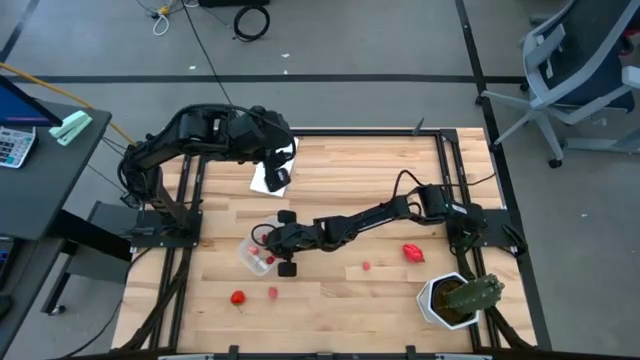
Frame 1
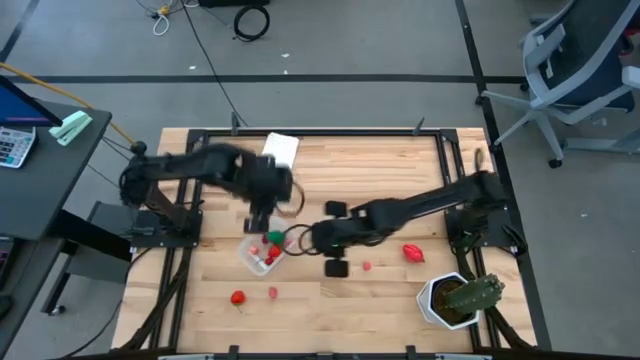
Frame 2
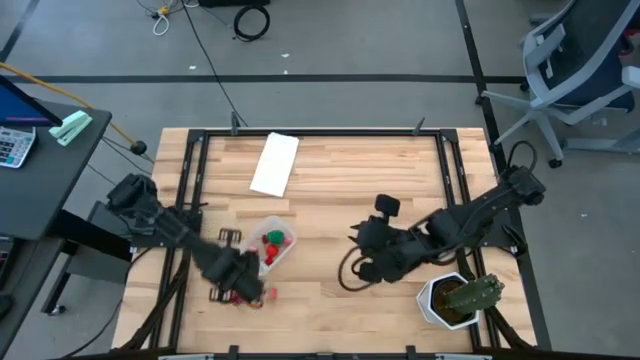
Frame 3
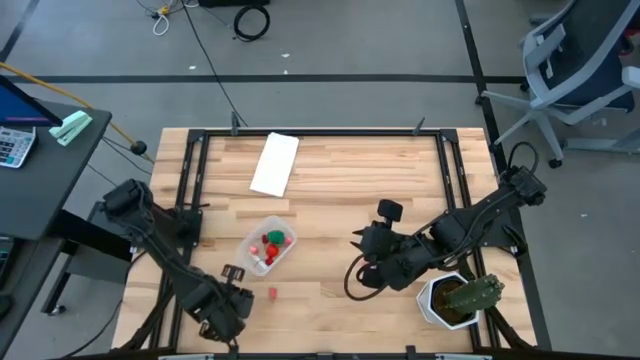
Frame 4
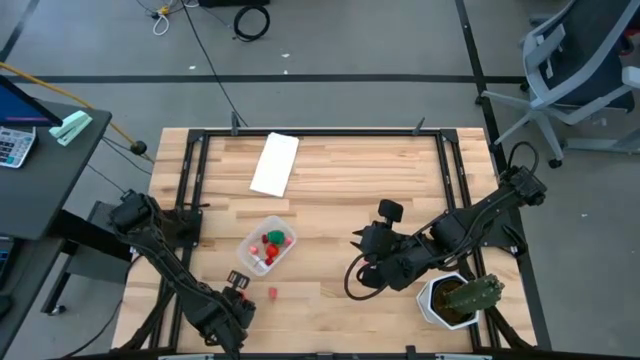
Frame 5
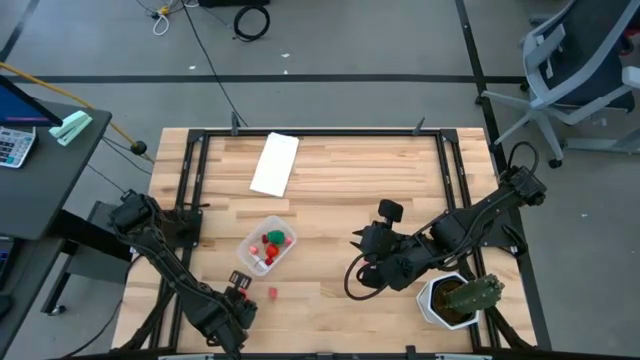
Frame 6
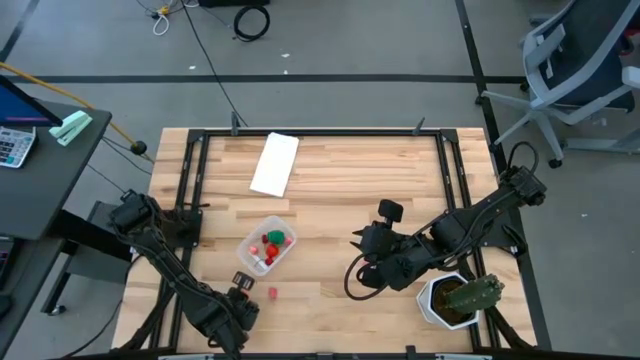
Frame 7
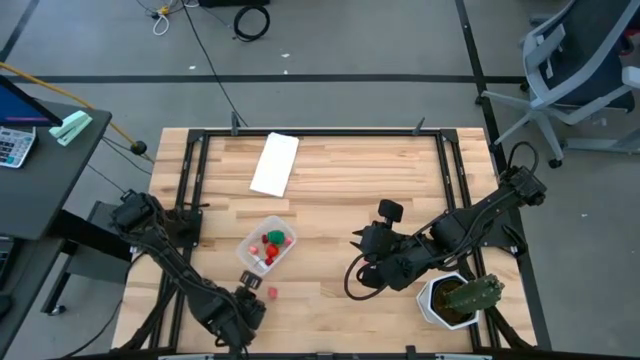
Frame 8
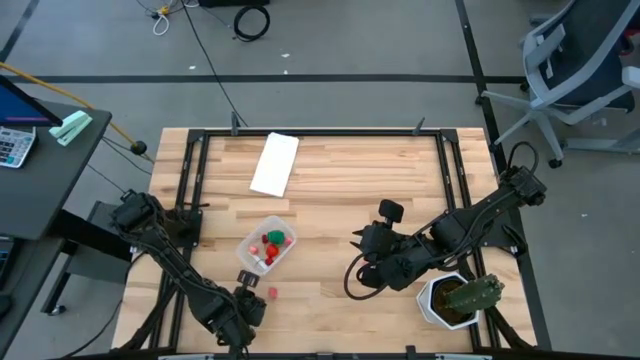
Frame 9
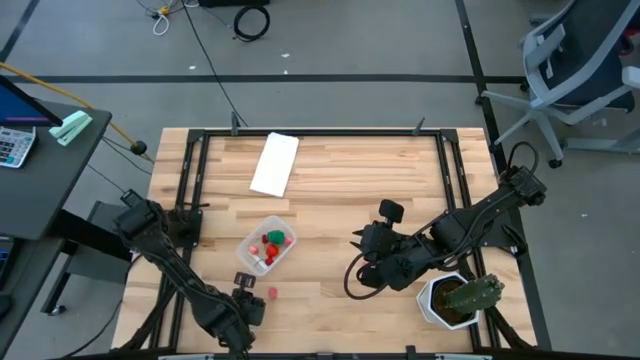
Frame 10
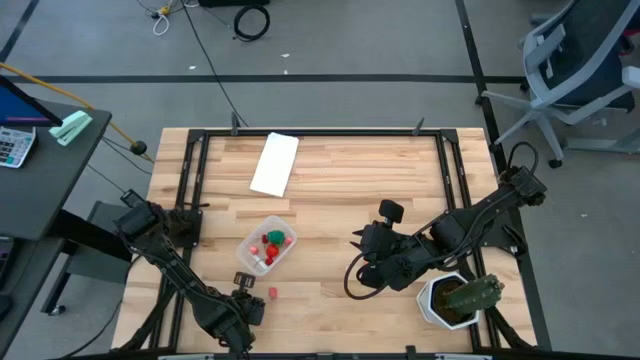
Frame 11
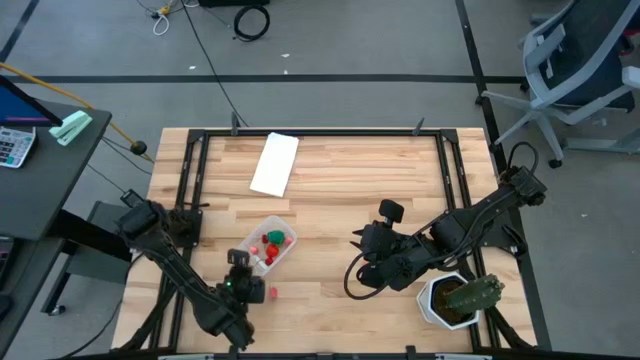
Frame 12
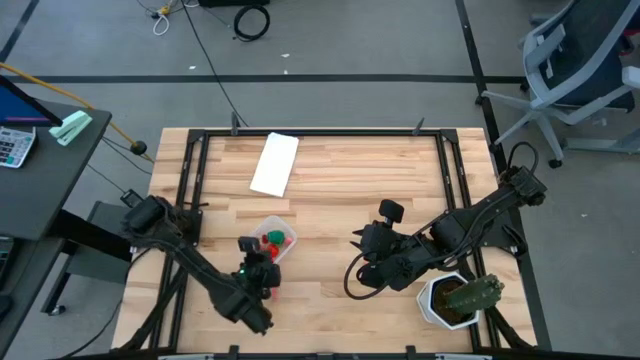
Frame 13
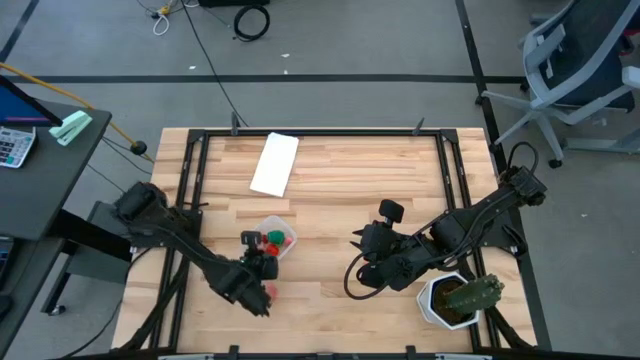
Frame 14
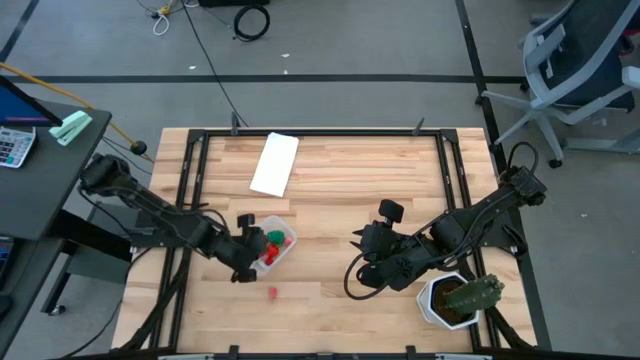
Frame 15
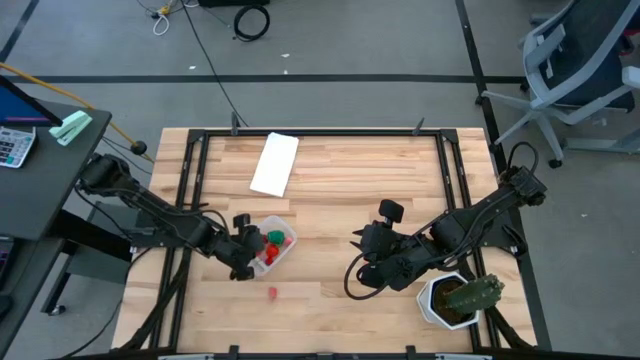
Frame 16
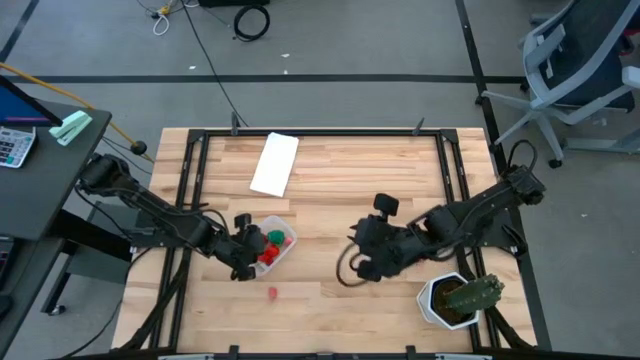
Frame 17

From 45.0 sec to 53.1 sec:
Task: Pick and placing Produce into tupperware
Put the strawberry into the transparent bin

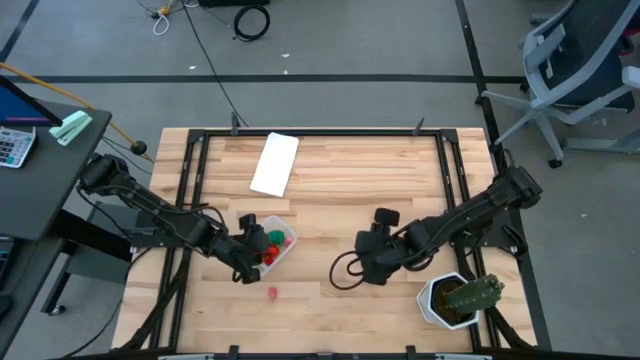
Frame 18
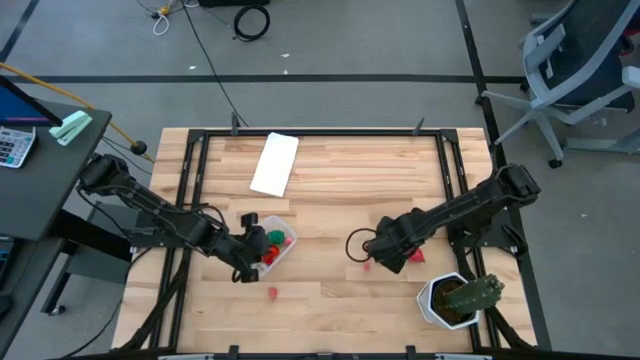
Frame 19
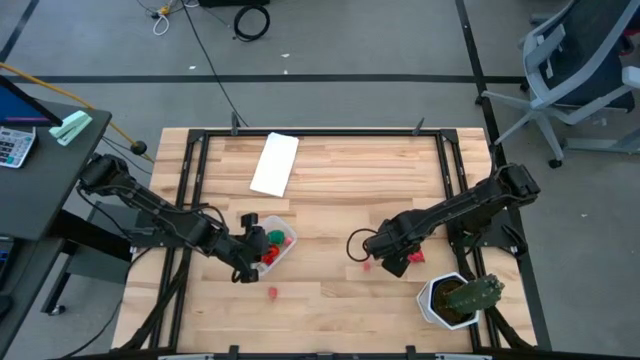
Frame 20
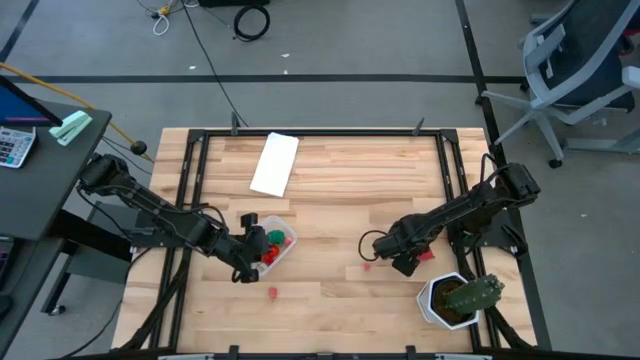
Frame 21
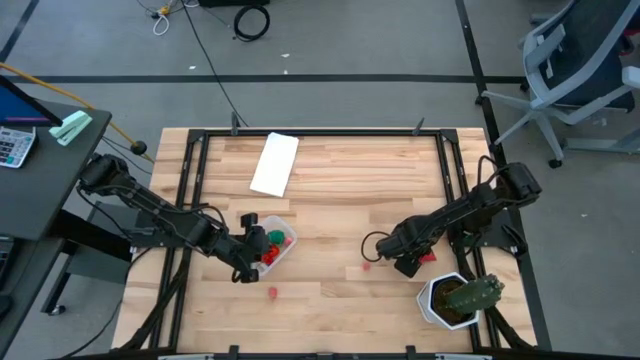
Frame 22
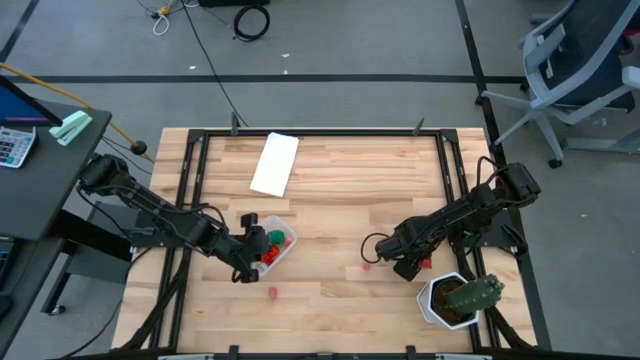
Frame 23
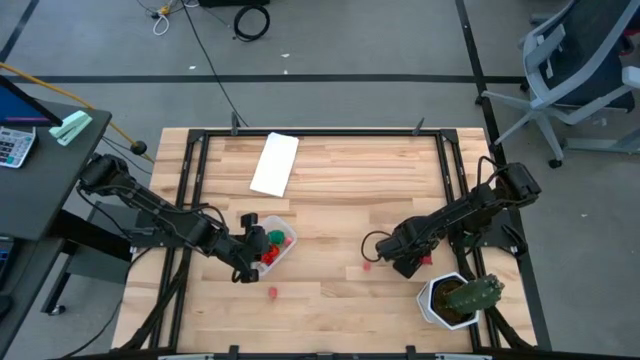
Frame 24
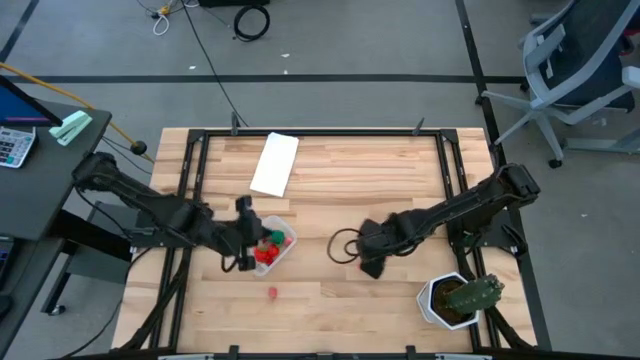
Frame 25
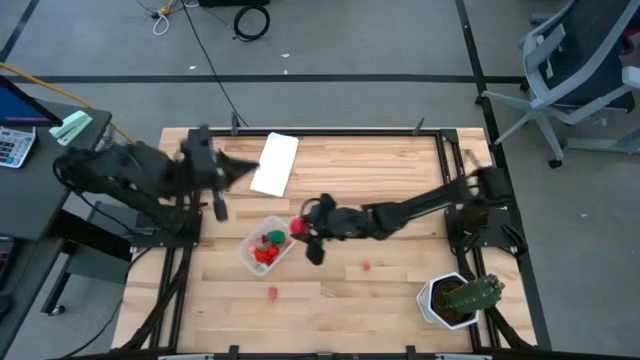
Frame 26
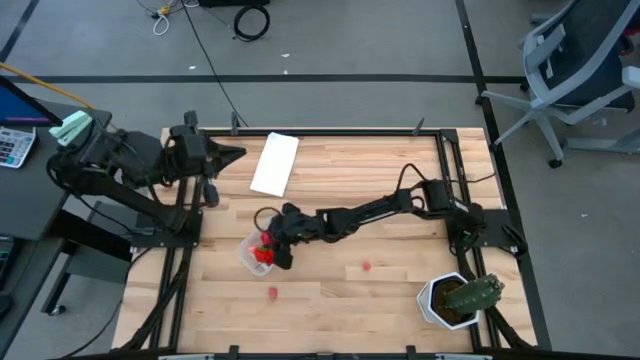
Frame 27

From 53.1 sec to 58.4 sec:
Put the dragon fruit into the transparent bin

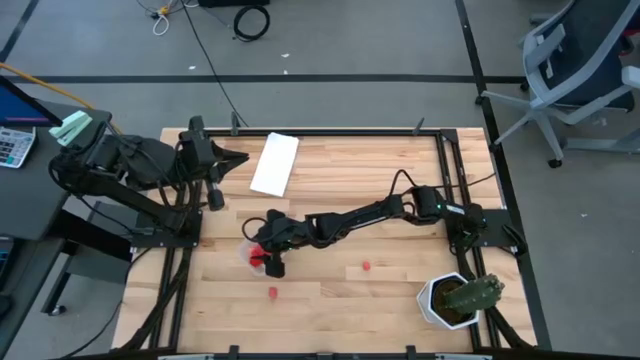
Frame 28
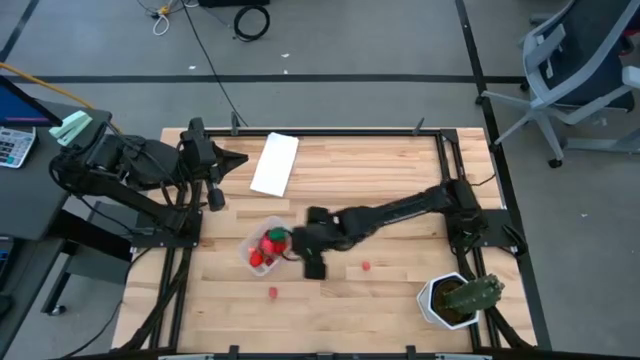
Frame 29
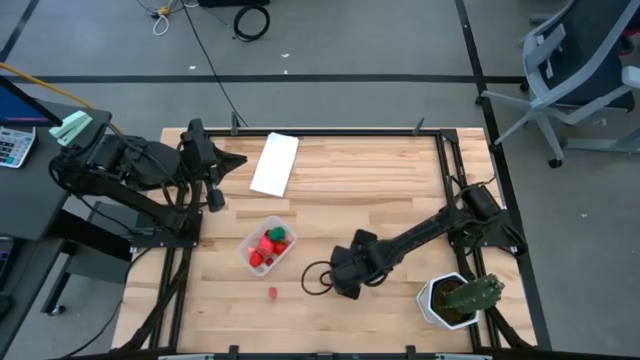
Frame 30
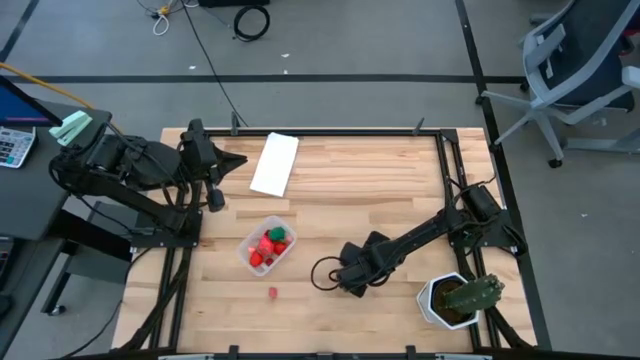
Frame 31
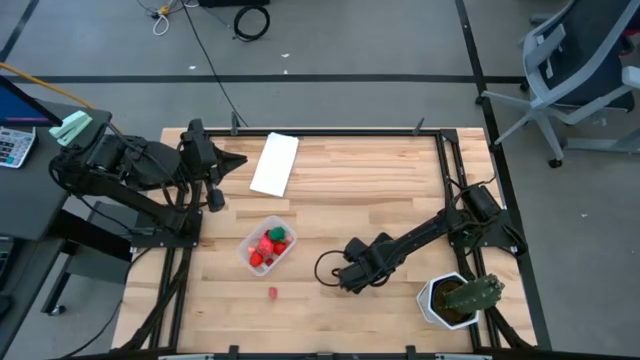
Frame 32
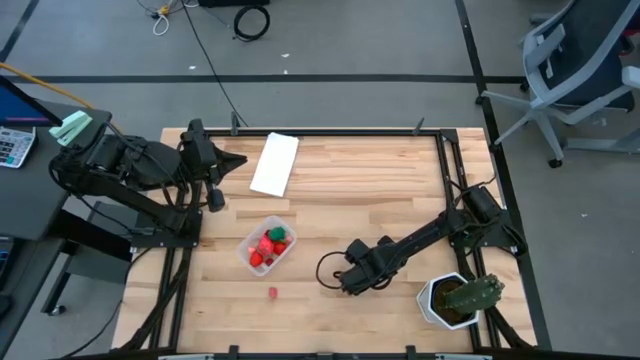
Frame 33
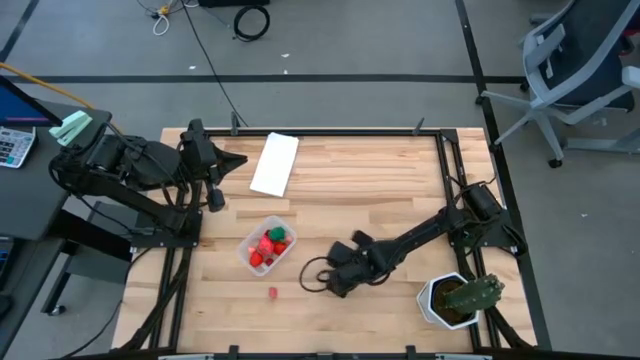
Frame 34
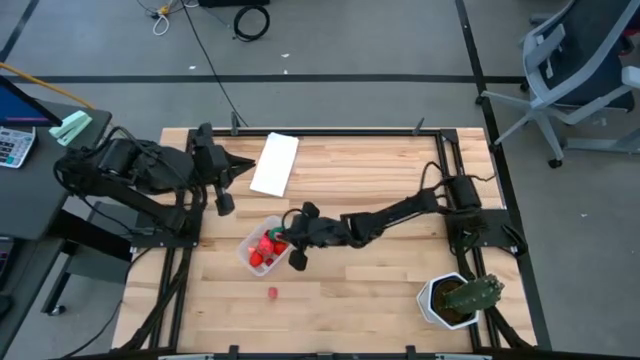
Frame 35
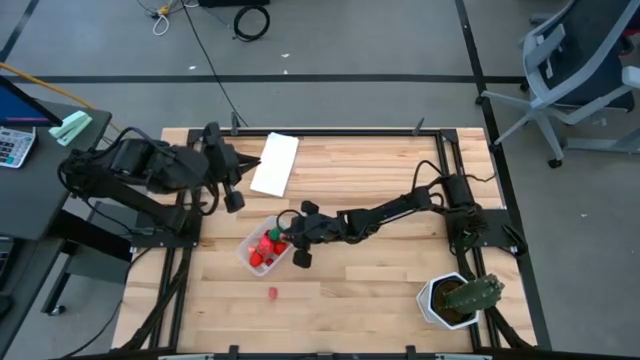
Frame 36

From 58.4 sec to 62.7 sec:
Put the peach into the transparent bin

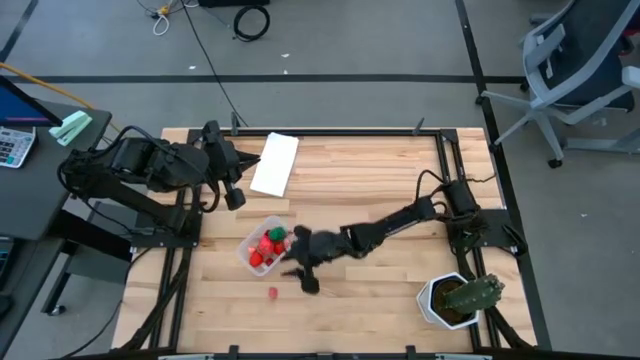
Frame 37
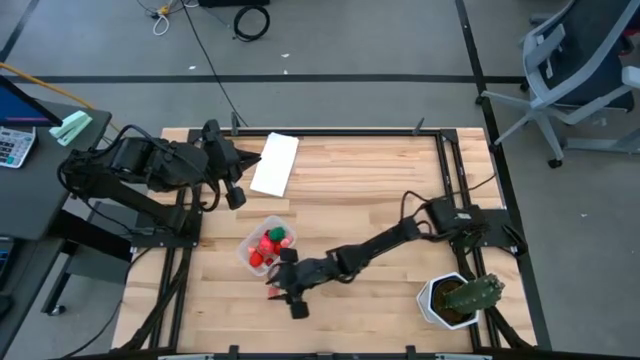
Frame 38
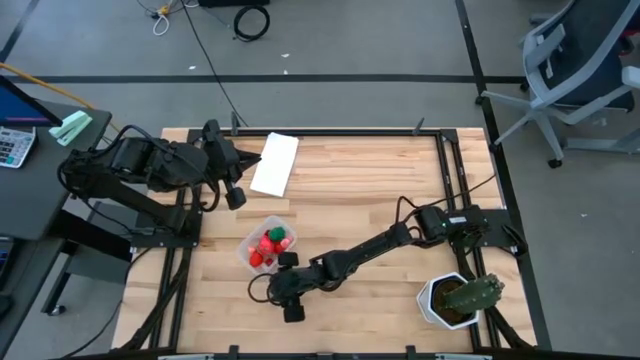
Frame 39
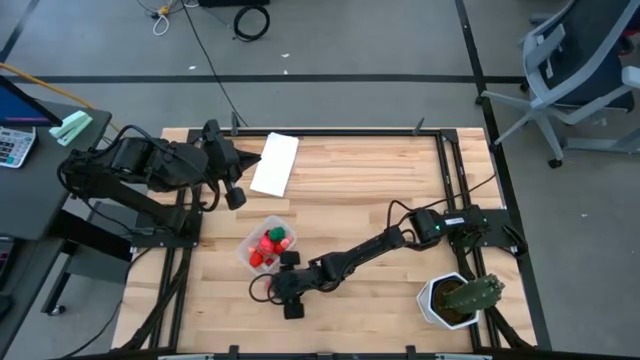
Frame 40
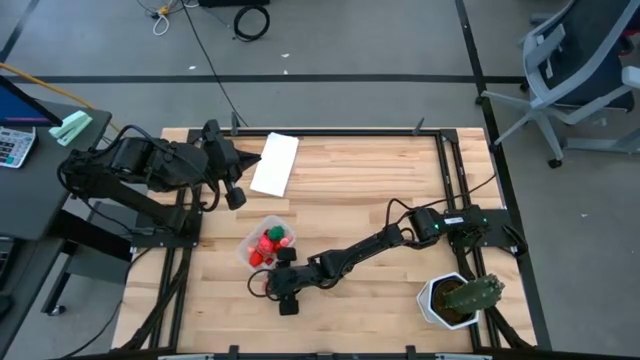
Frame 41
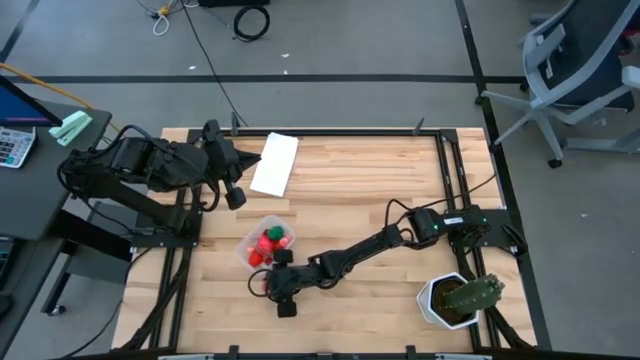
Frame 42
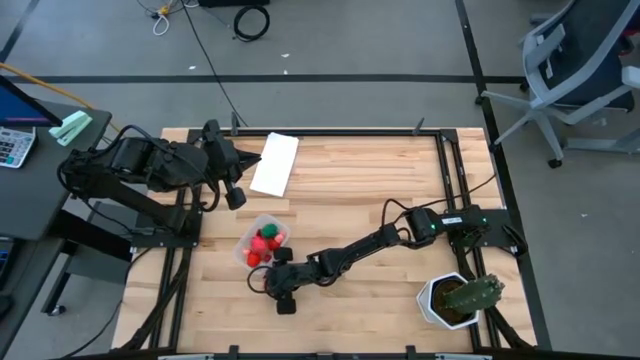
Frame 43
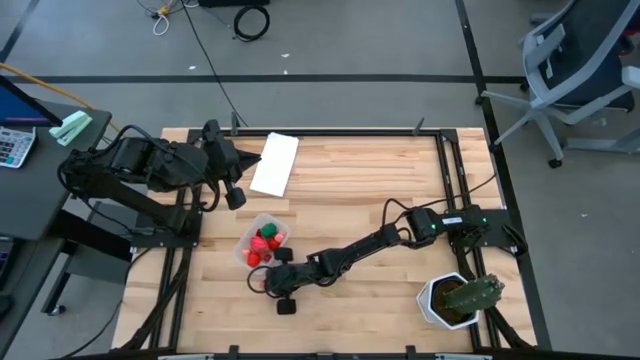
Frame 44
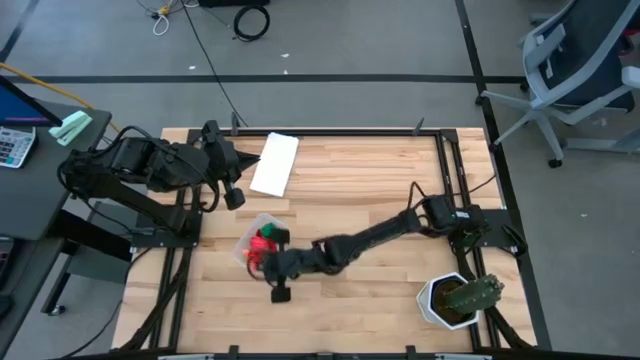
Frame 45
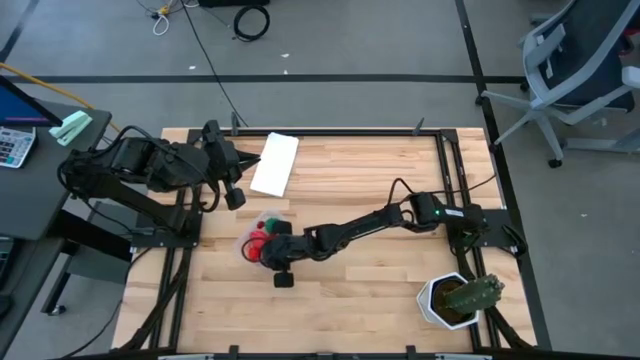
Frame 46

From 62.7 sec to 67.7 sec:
Put the peach into the transparent bin
